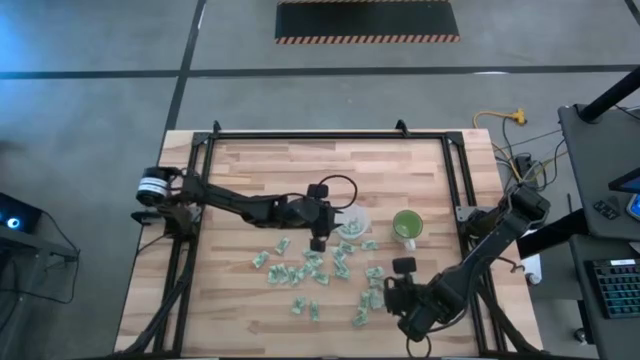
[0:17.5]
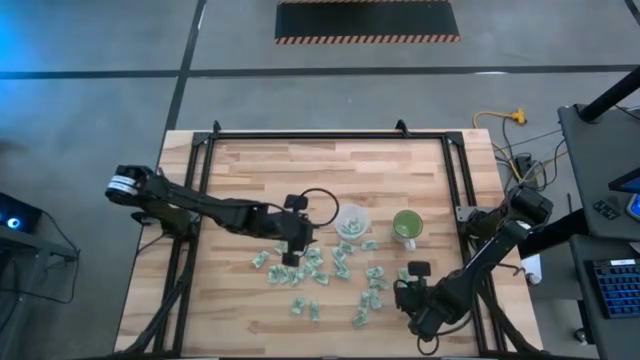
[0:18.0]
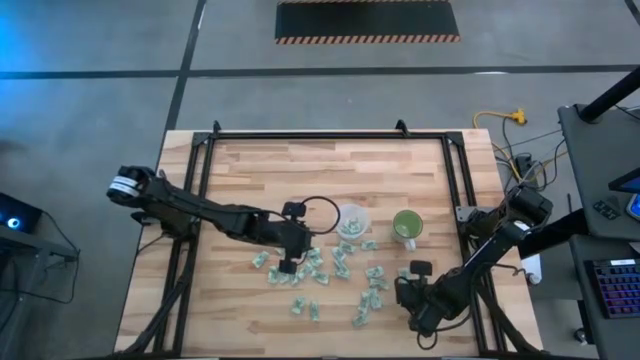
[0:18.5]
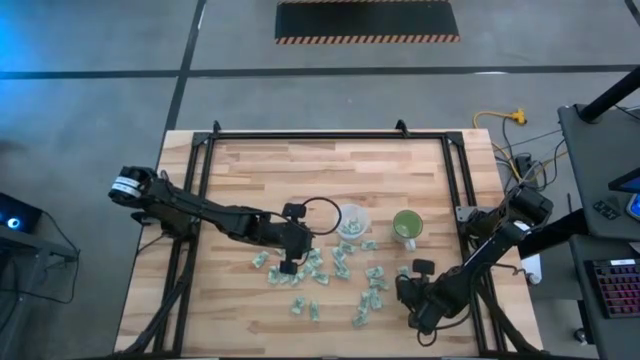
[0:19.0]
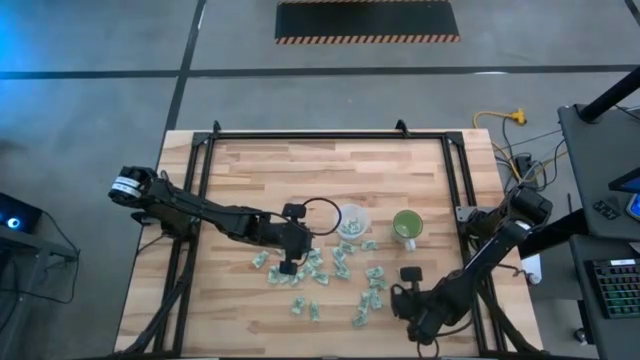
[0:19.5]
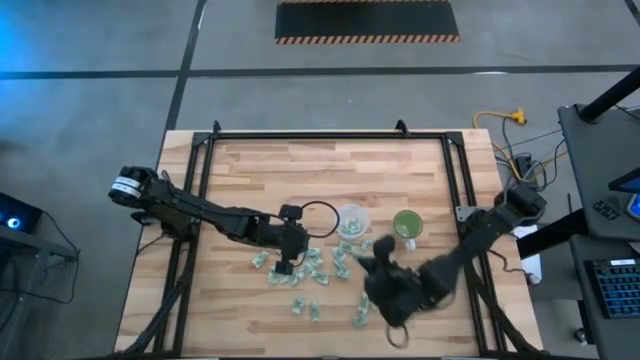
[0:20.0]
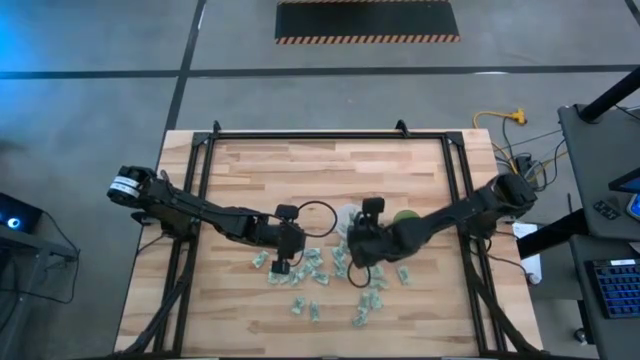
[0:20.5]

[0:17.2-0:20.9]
Task: Pick and place Stevia / Truvia into bins
Put the green stevia packet into the transparent container

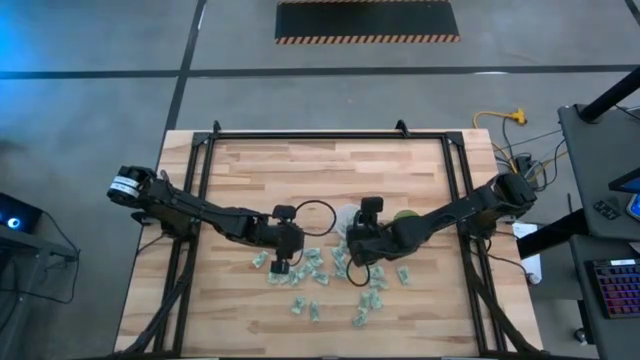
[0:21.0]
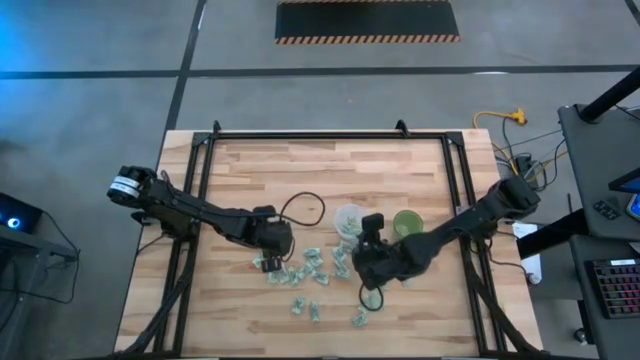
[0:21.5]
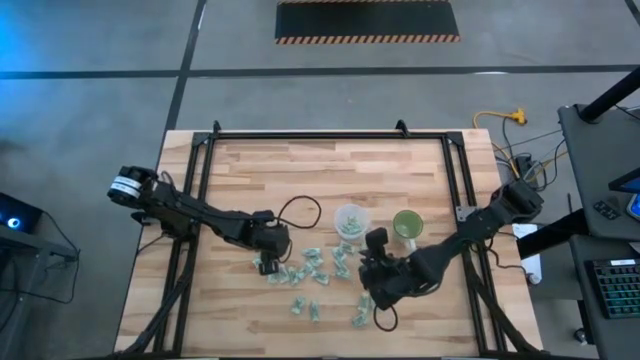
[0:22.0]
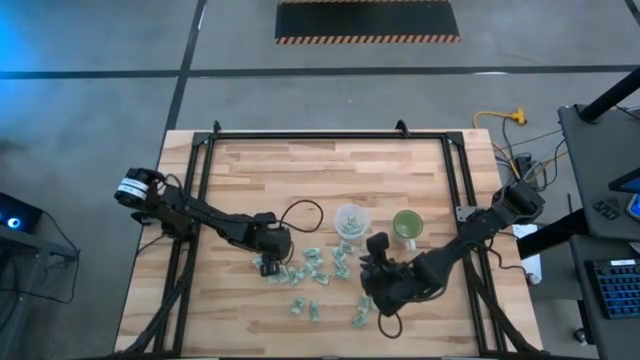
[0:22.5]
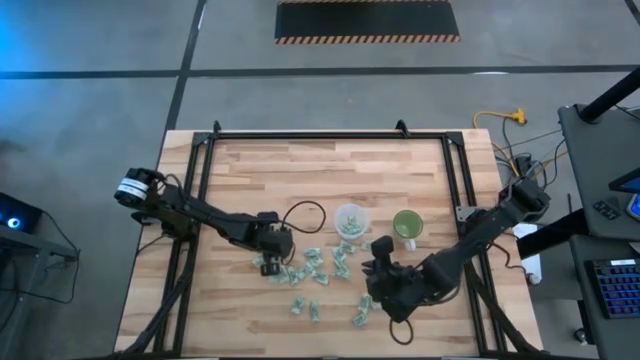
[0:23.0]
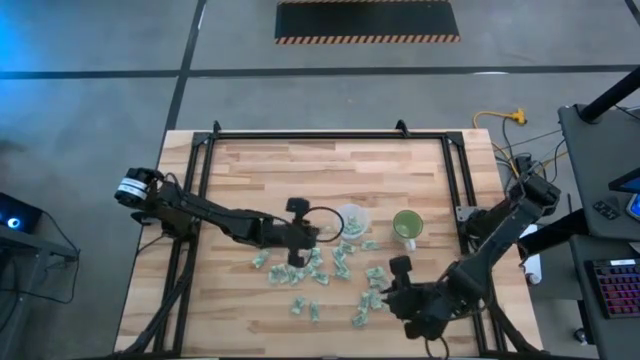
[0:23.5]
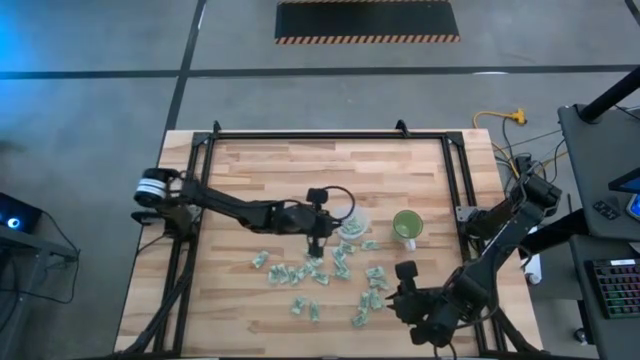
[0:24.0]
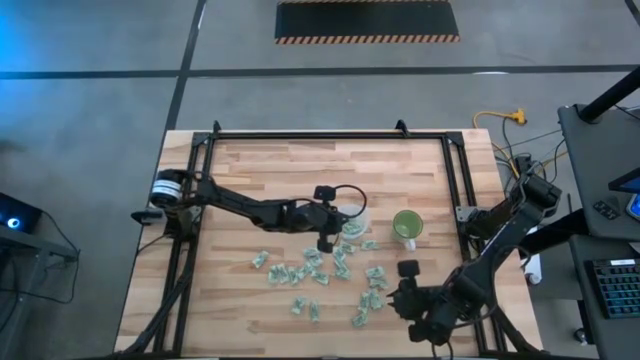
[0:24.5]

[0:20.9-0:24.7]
Put the green stevia packet into the transparent container

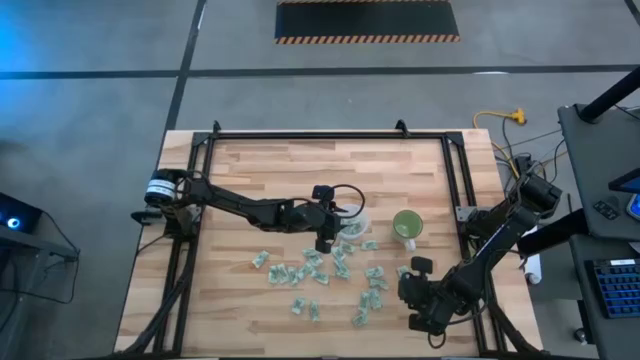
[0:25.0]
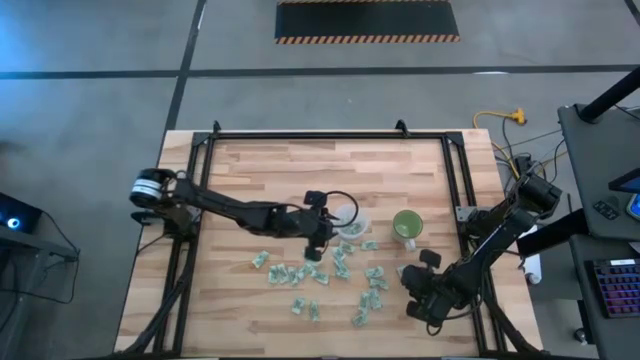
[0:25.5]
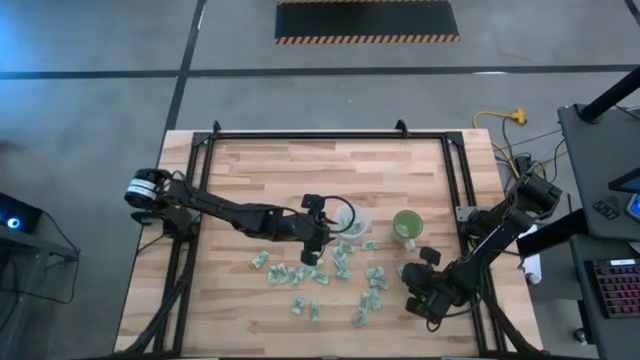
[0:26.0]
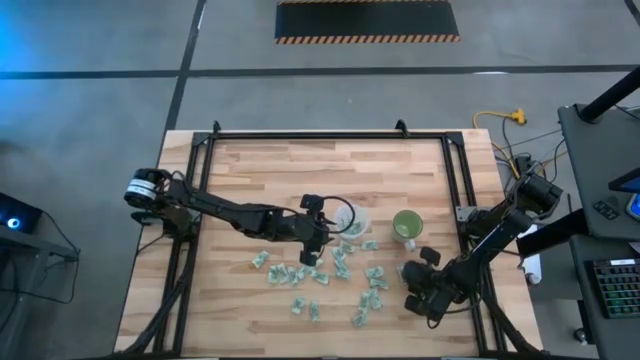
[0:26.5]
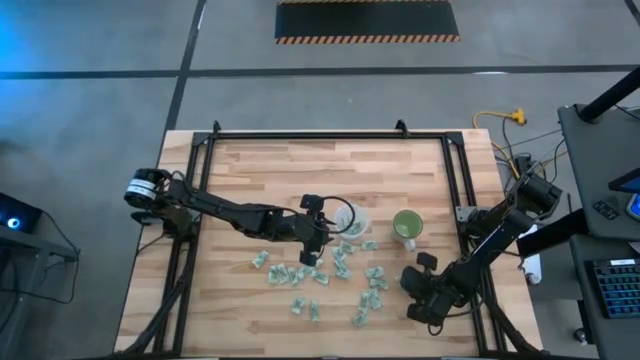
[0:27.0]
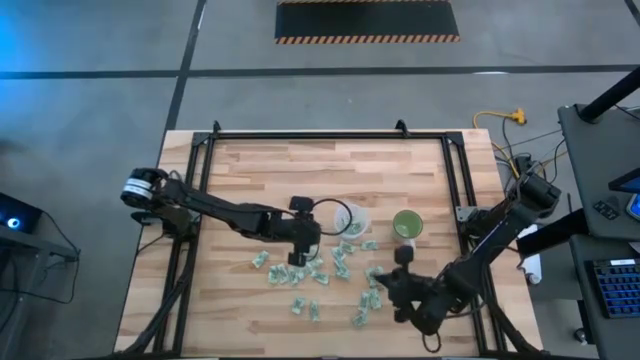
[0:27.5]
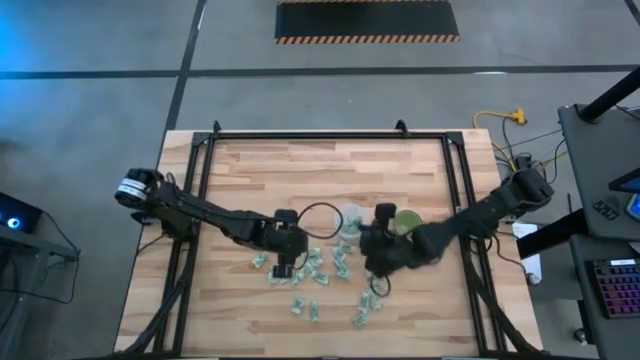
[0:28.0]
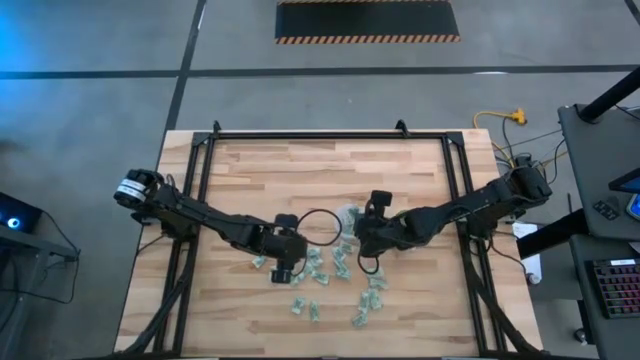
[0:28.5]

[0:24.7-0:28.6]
Put the green stevia packet into the transparent container

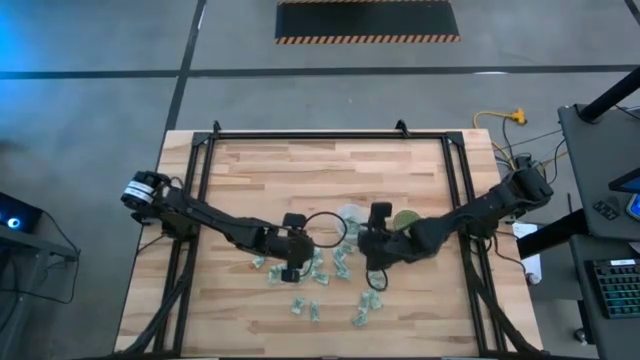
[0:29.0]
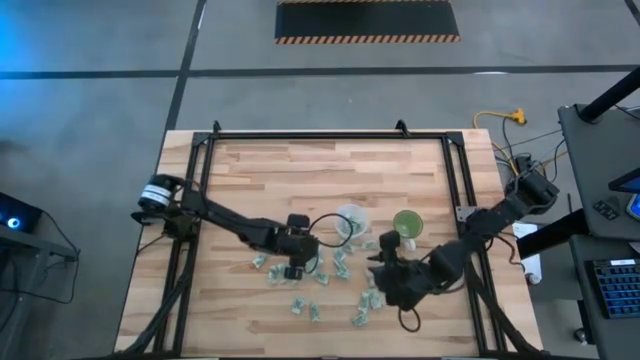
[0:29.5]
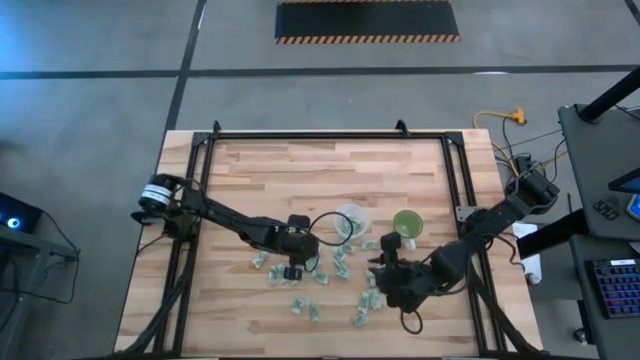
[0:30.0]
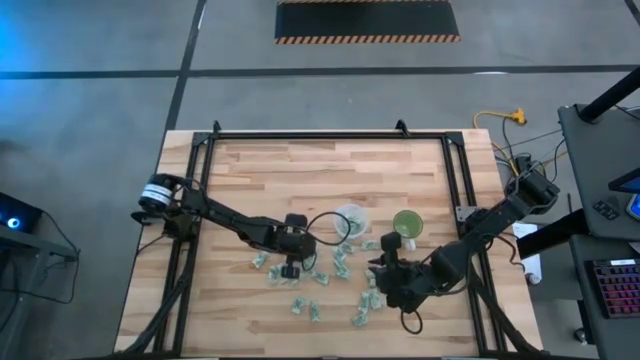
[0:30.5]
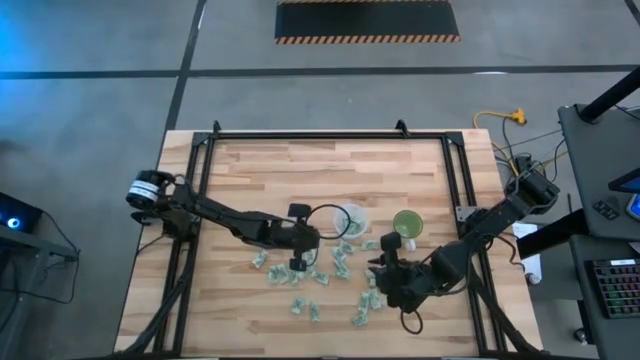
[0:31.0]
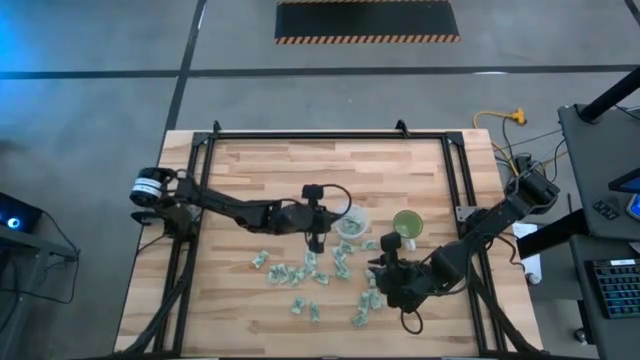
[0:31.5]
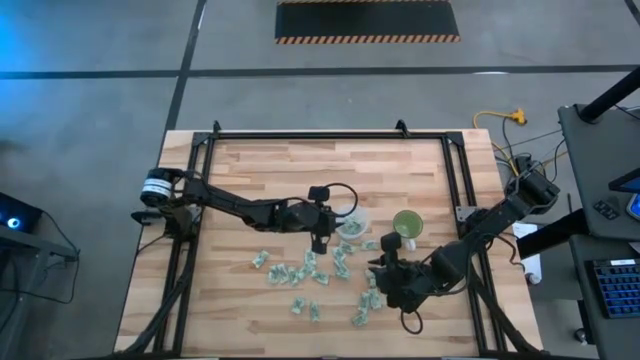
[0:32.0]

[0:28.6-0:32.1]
Put the green stevia packet into the transparent container

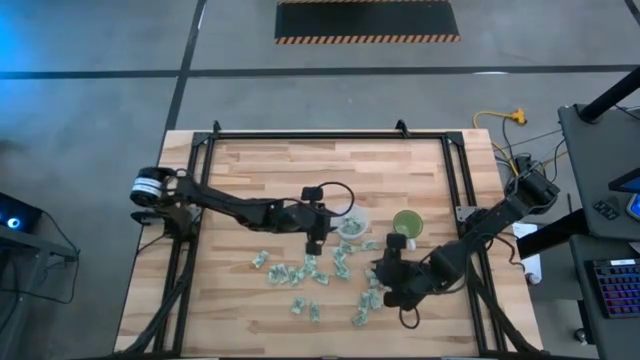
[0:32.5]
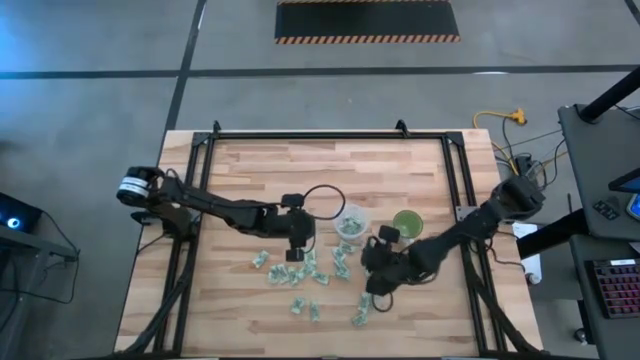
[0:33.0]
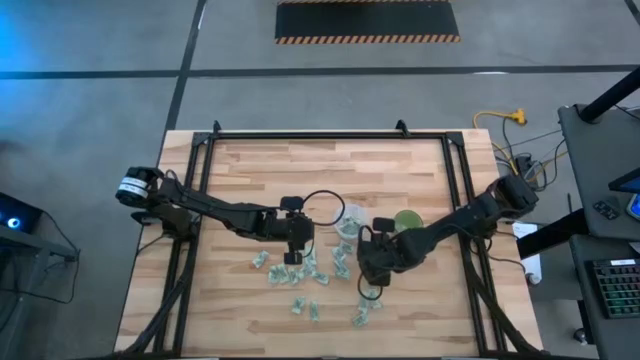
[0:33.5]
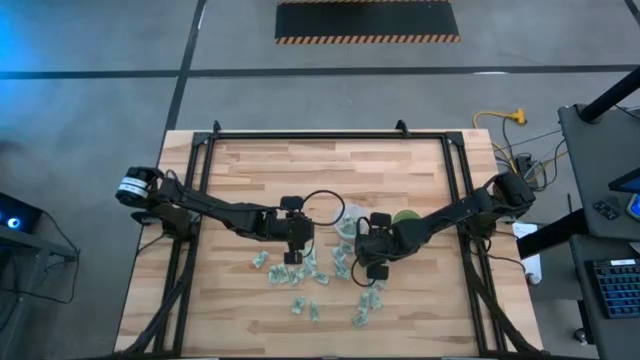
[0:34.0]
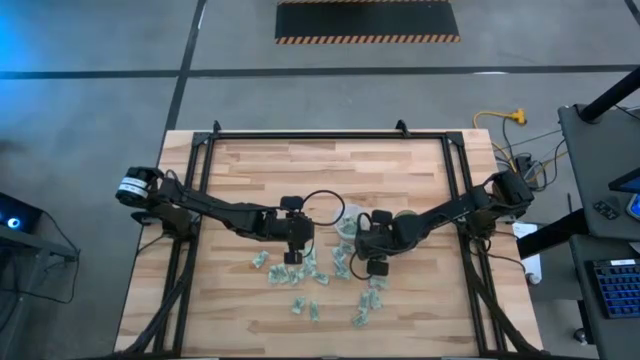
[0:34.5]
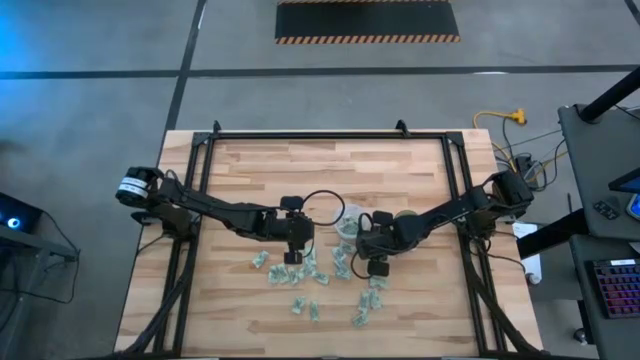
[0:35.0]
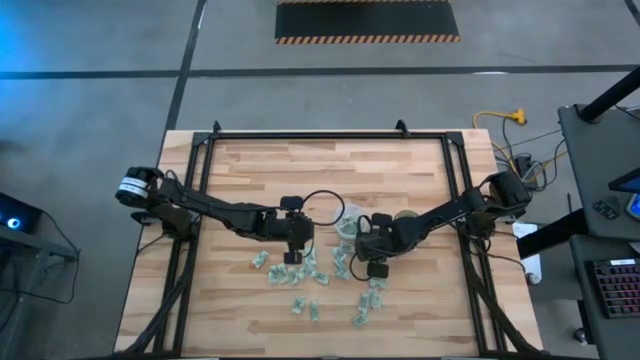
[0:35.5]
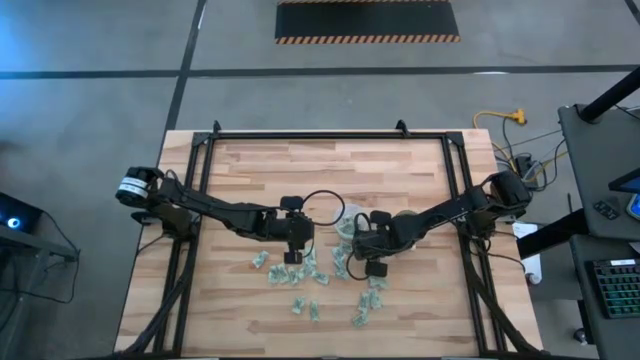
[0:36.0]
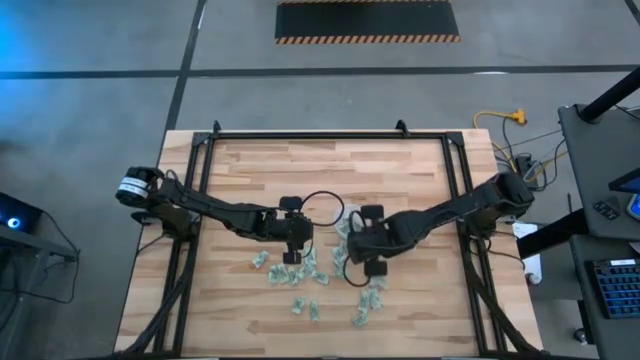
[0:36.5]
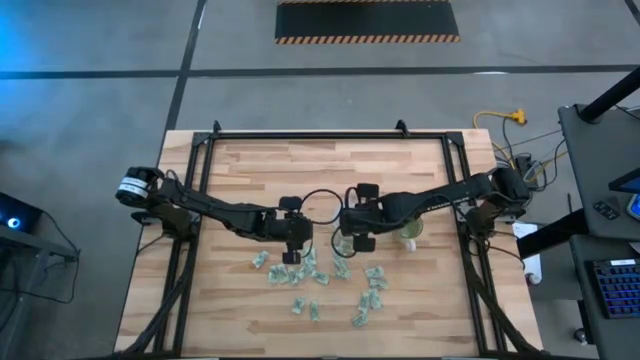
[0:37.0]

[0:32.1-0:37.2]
Put the green stevia packet into the transparent container

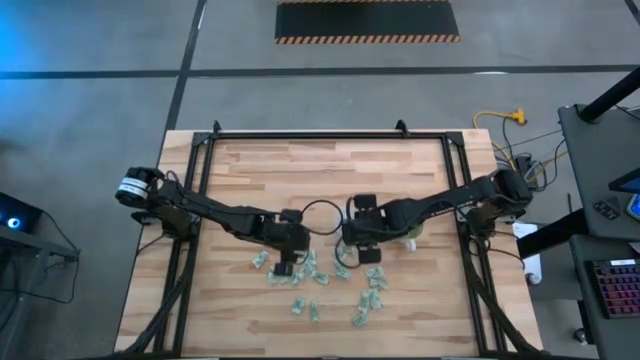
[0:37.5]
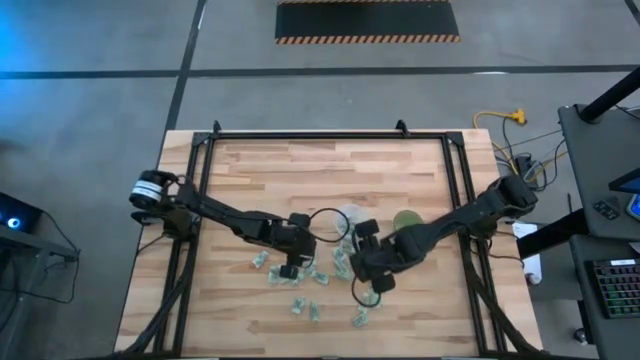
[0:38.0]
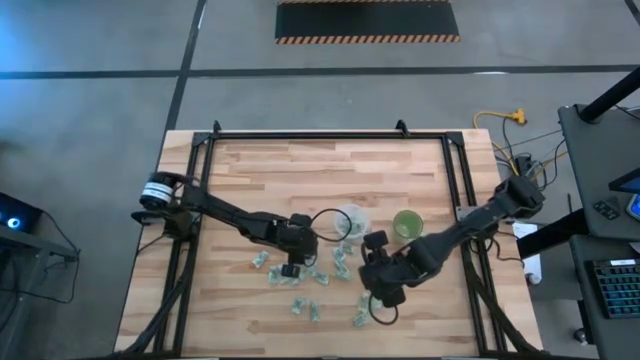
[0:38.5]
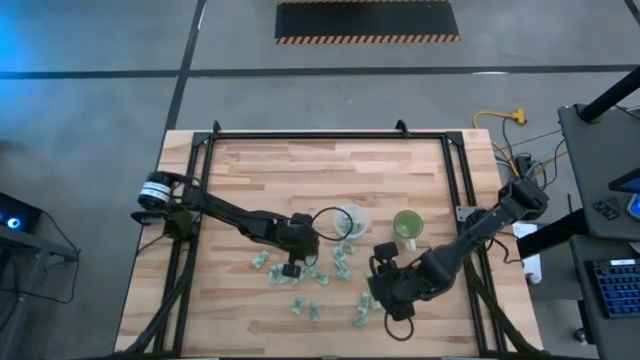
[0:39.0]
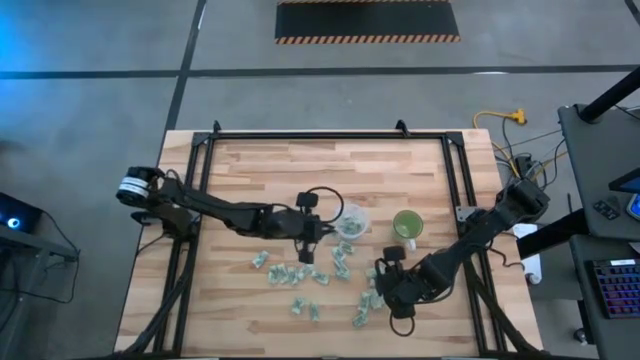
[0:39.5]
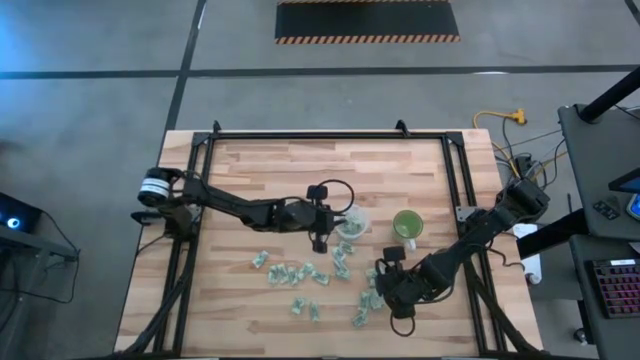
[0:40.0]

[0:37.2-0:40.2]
Put the green stevia packet into the transparent container
